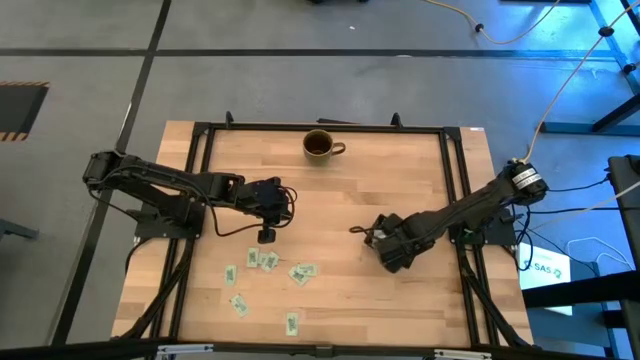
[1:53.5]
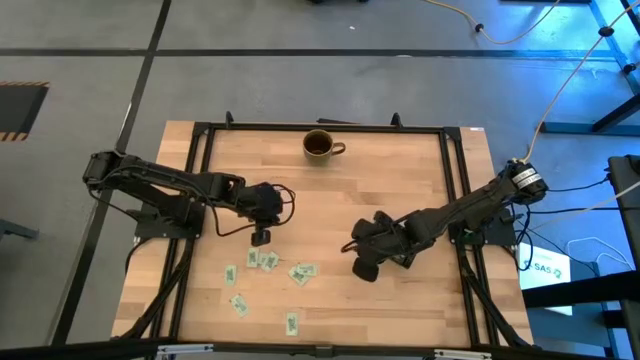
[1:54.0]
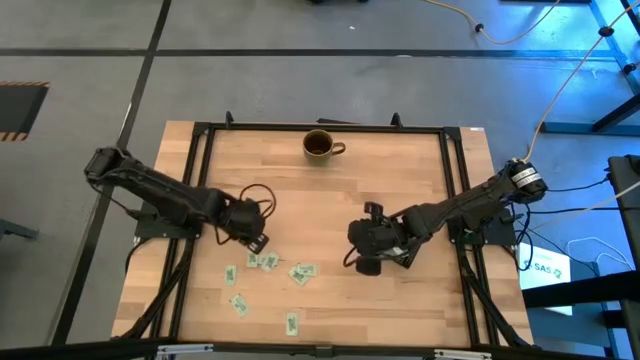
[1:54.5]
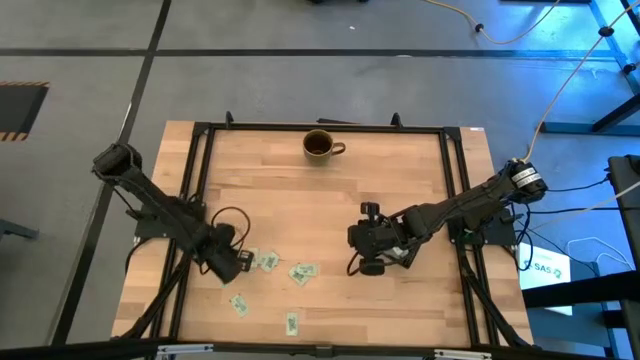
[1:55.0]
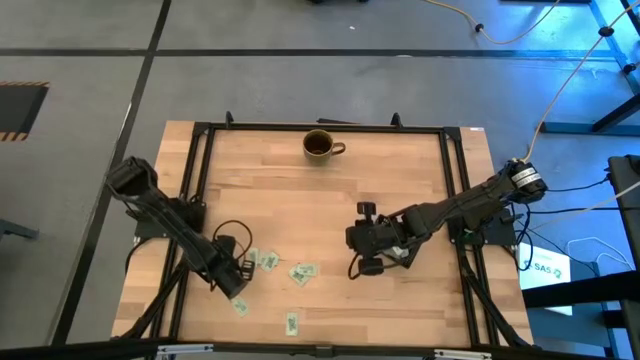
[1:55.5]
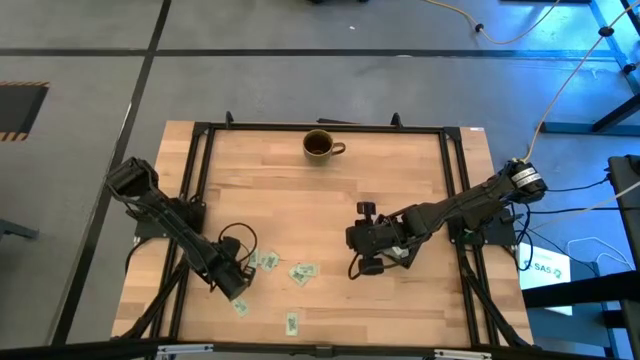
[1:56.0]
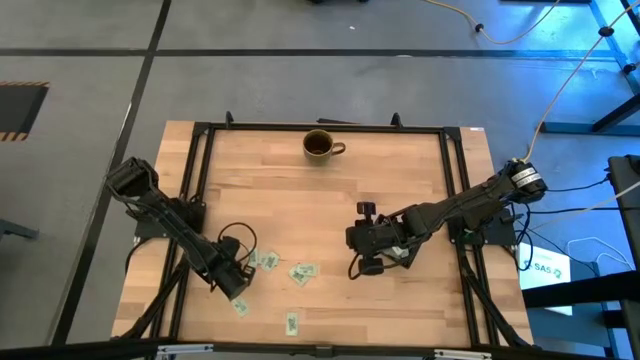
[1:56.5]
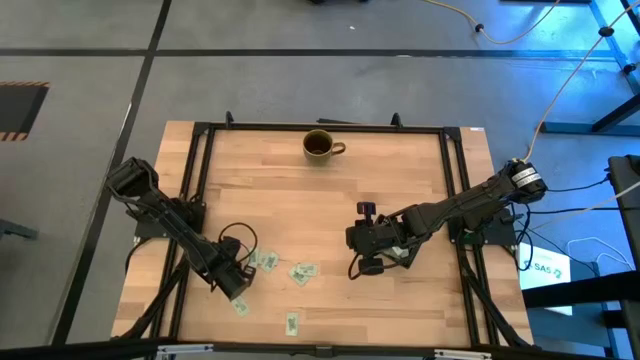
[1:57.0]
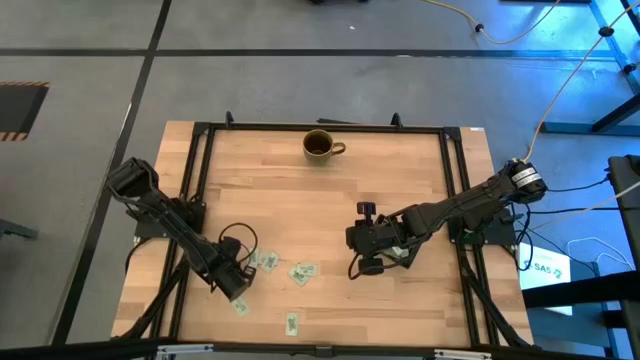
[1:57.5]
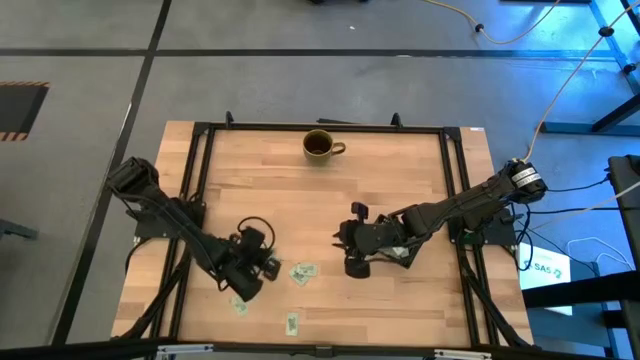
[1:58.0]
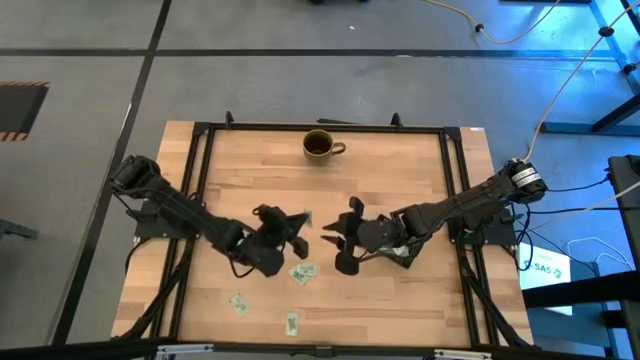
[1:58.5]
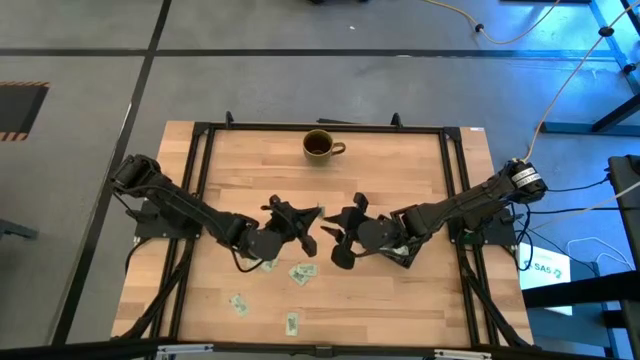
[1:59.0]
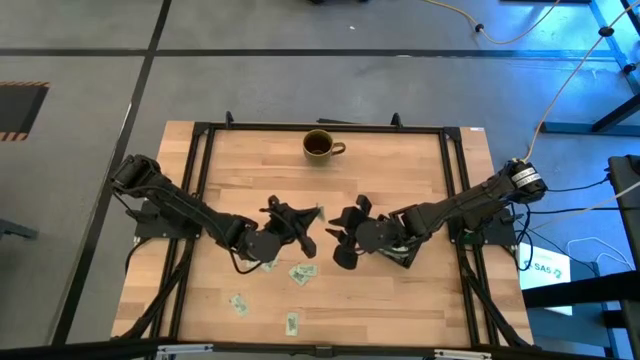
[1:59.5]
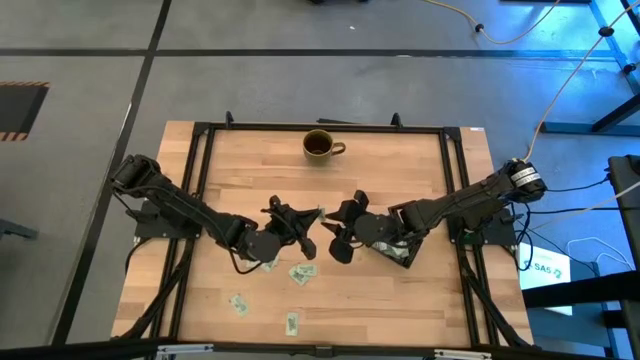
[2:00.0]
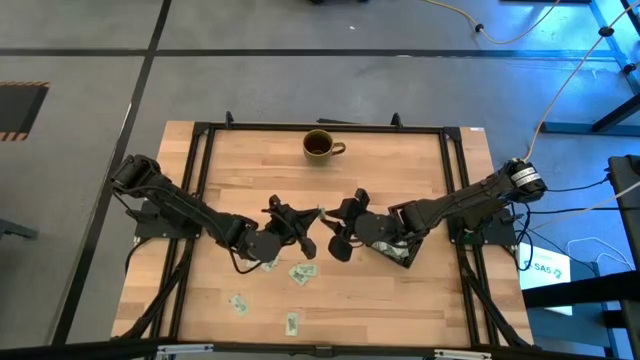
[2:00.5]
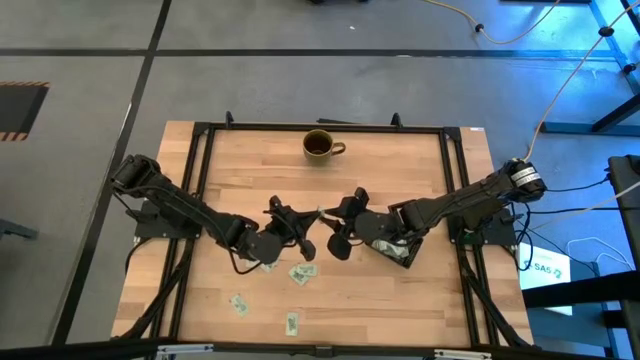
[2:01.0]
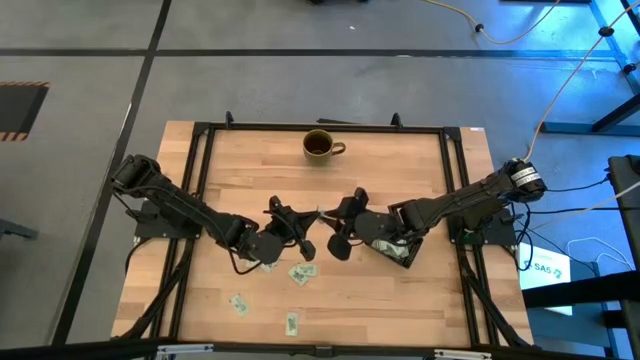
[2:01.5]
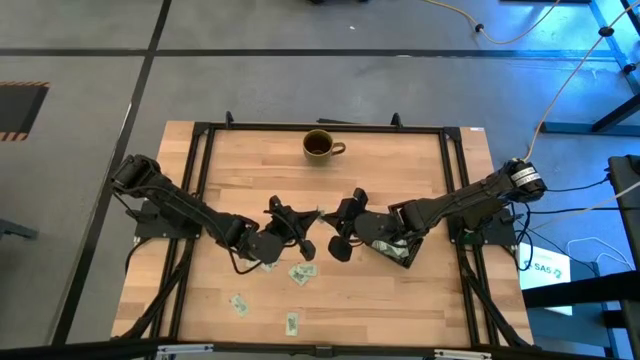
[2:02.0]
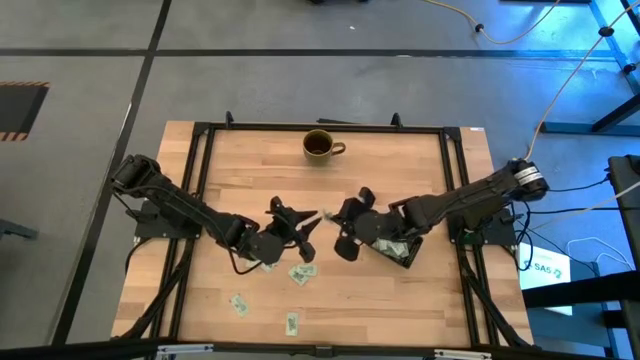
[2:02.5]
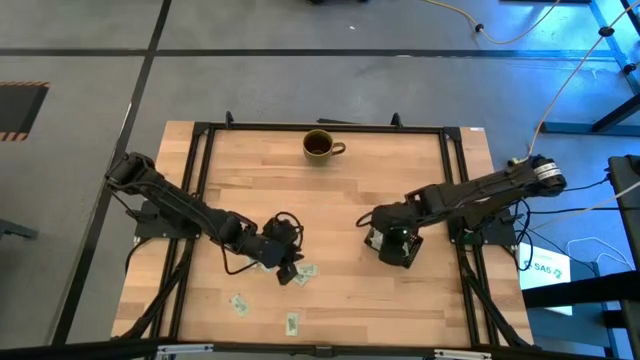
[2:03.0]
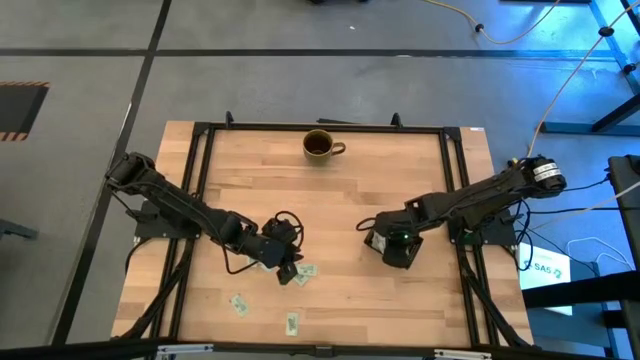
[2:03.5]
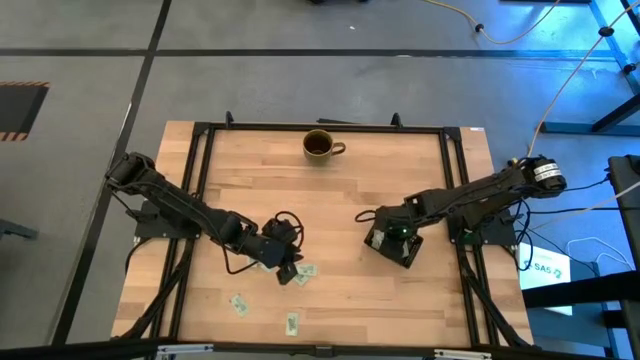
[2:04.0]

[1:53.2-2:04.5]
Task: Pick and place Stevia / Truvia into bins
Put the stevia packet into the black bin

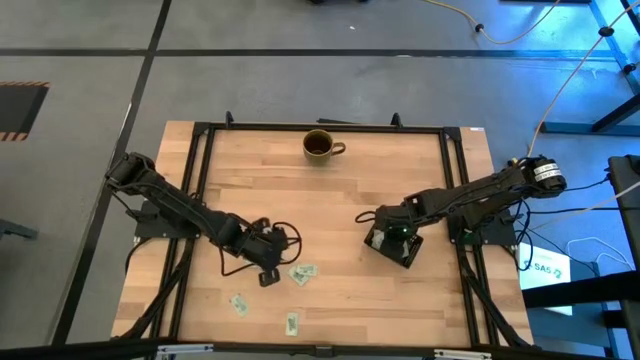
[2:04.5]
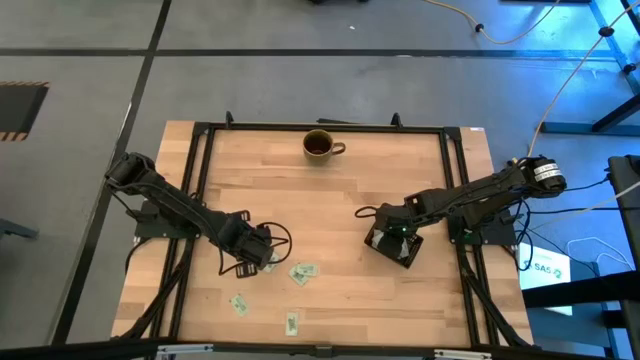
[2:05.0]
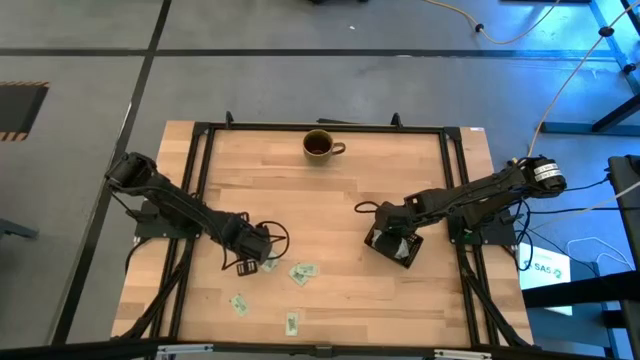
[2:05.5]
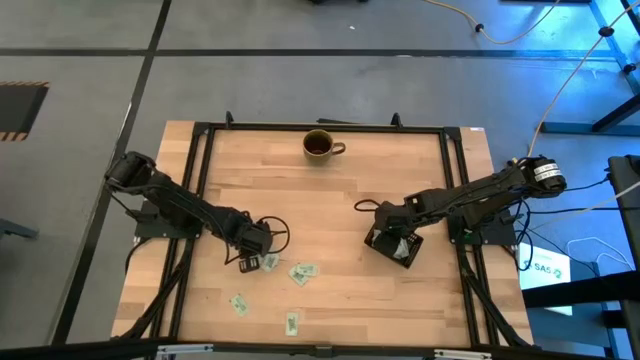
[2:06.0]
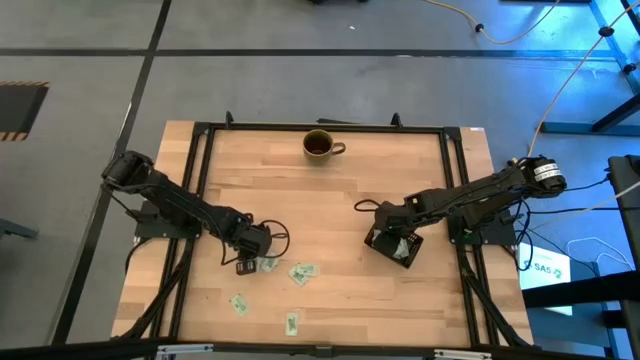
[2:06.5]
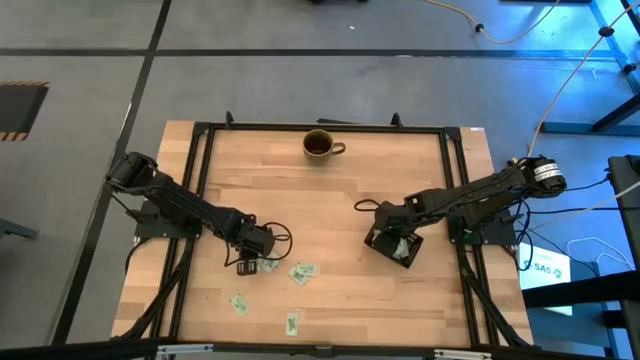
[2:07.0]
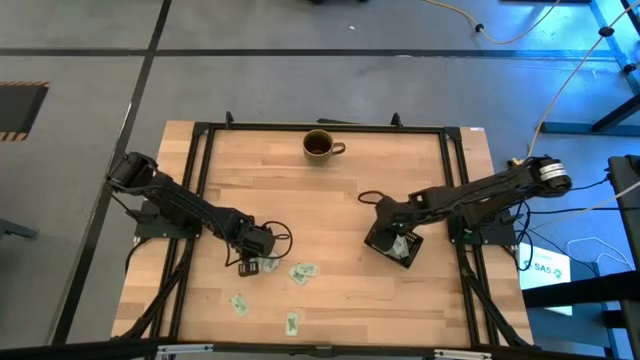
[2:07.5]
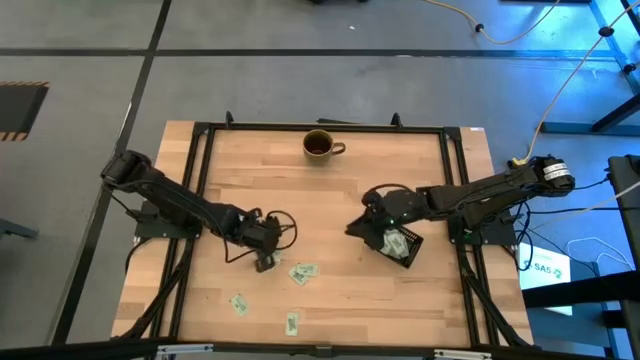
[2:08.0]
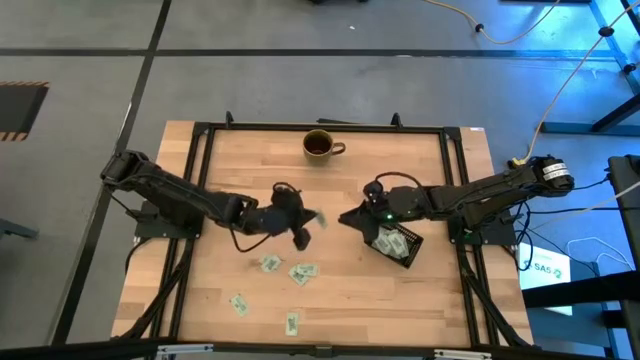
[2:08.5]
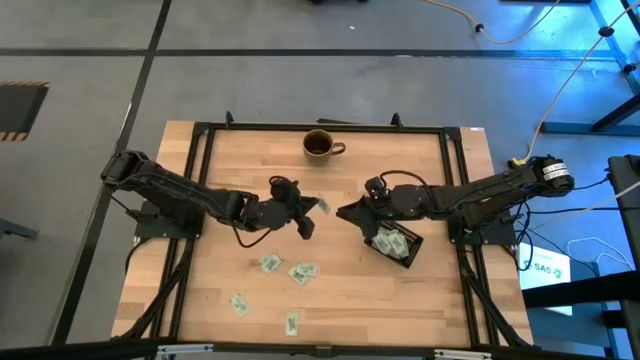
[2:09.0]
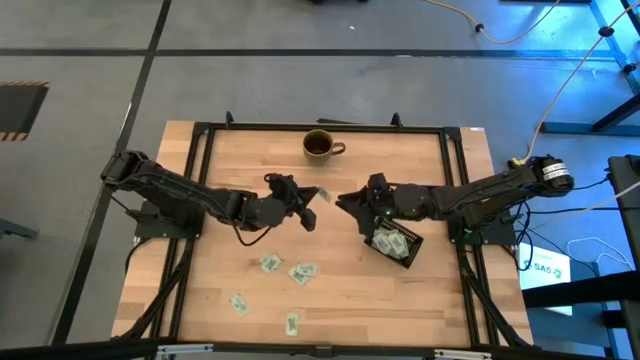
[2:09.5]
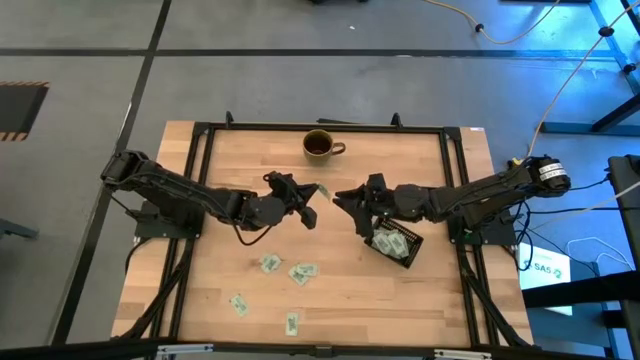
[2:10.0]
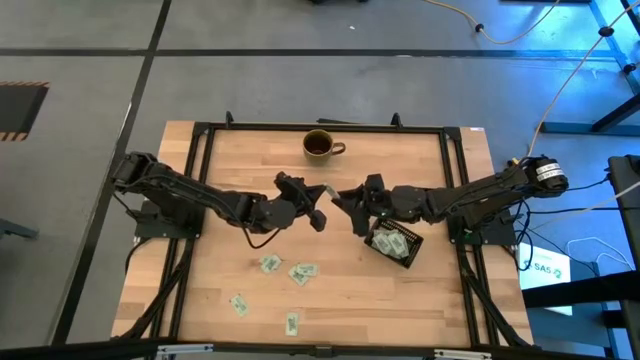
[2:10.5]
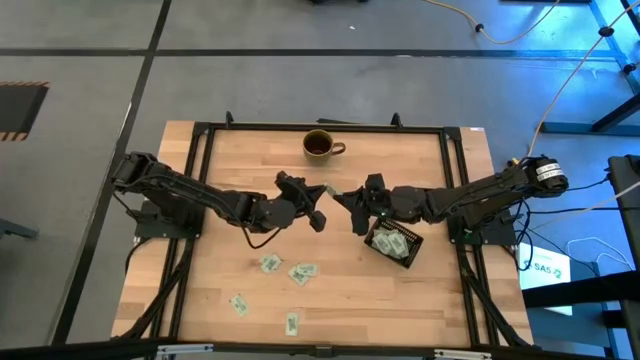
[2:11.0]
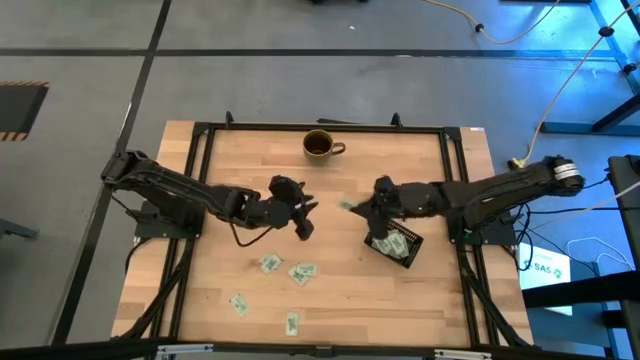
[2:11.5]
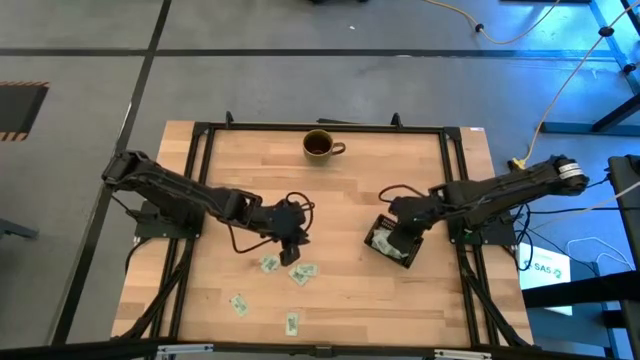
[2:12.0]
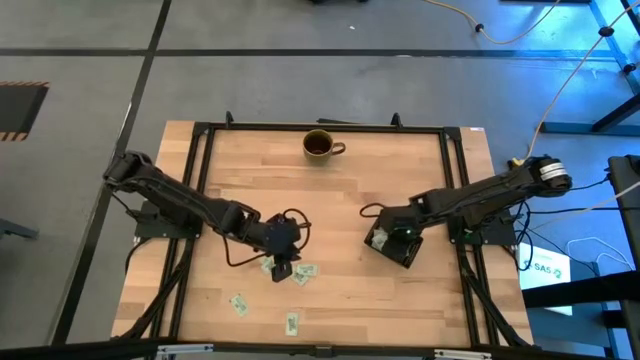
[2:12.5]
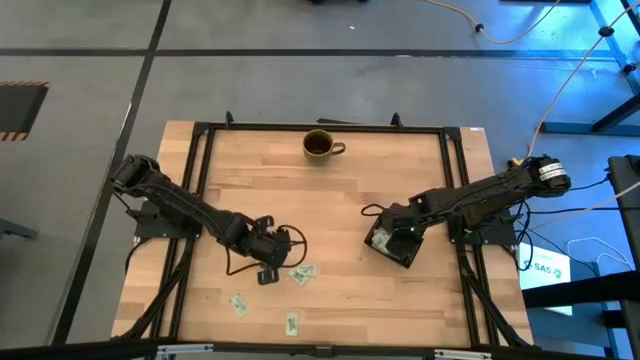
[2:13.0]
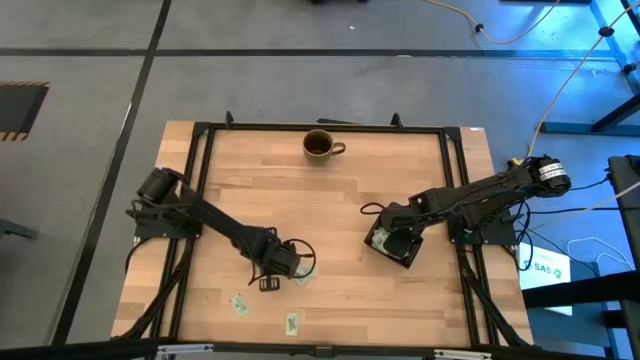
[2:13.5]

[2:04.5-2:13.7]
Put the stevia packet into the black bin

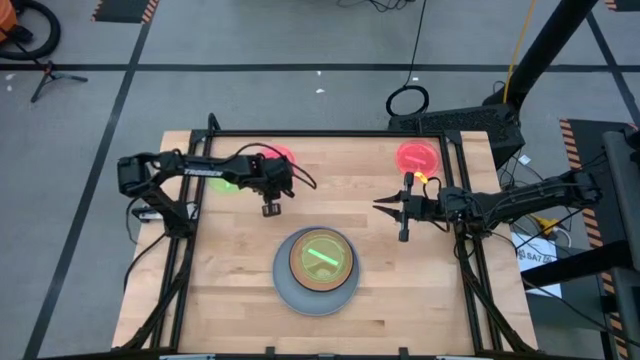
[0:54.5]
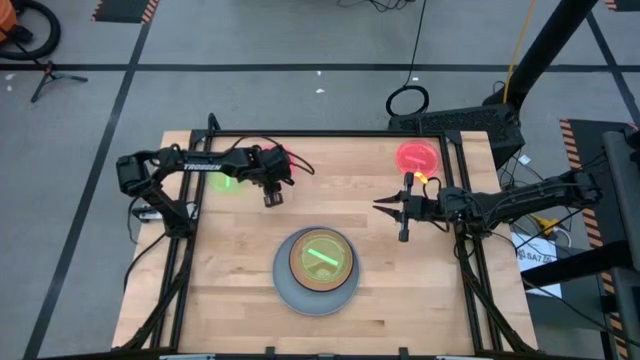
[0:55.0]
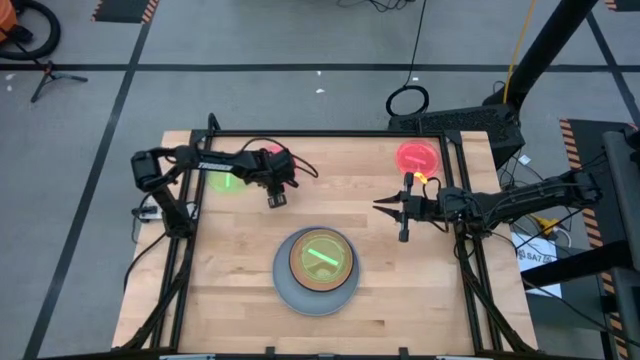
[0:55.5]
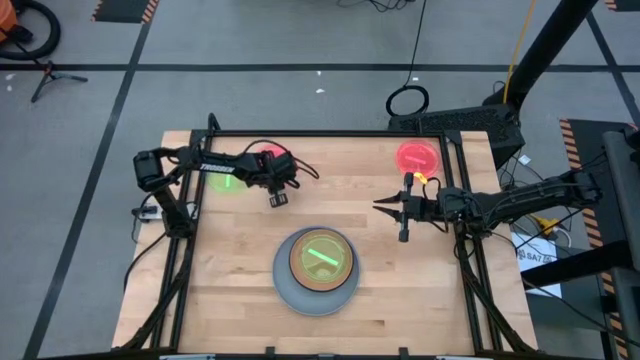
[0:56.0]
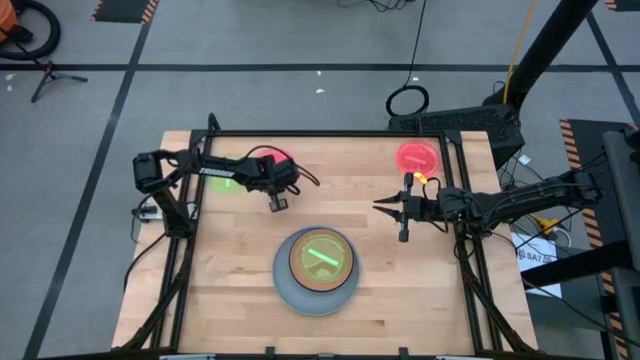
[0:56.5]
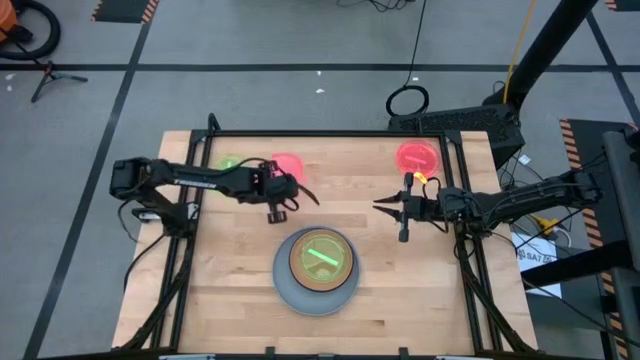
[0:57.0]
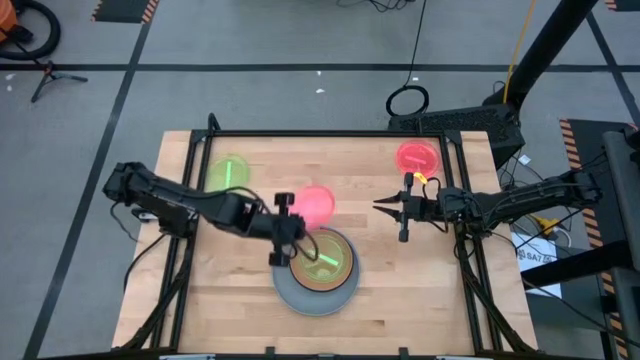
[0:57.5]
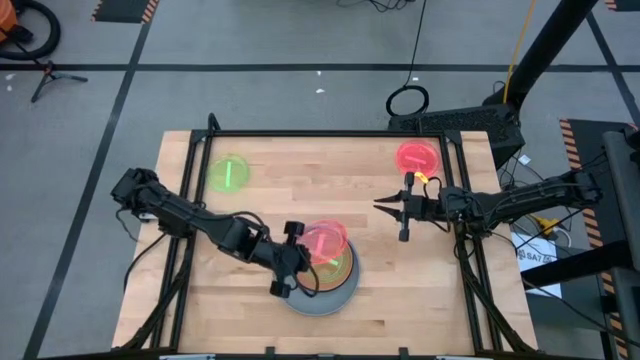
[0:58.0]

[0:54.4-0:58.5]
Task: Stack plastic plates
Stack the left red transparent plate on top of the green transparent plate
